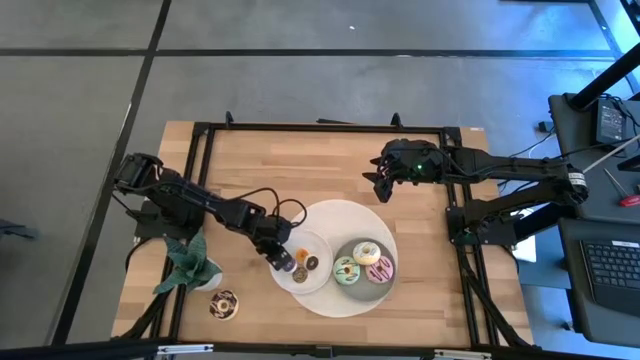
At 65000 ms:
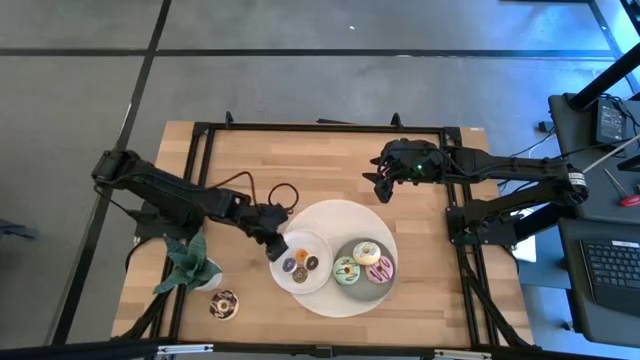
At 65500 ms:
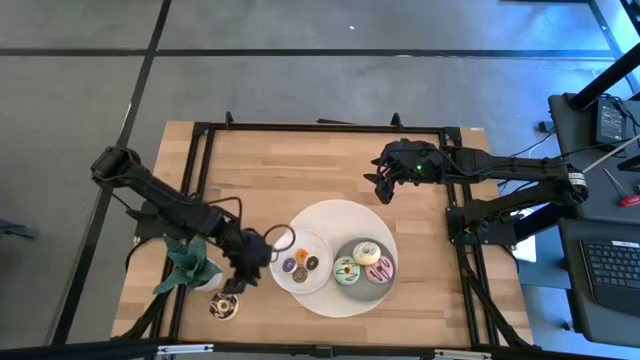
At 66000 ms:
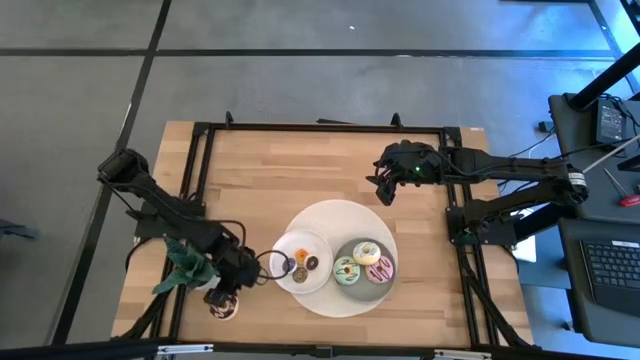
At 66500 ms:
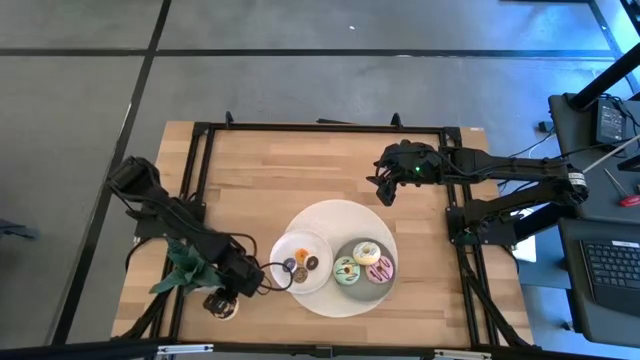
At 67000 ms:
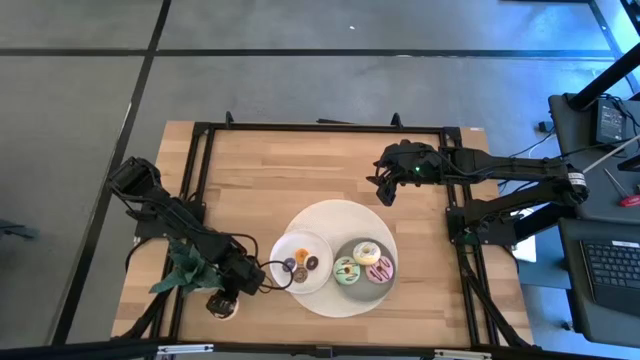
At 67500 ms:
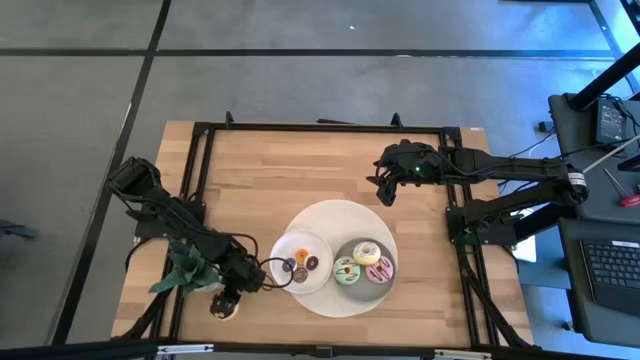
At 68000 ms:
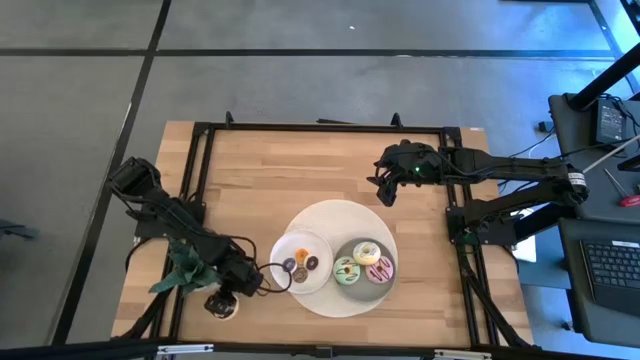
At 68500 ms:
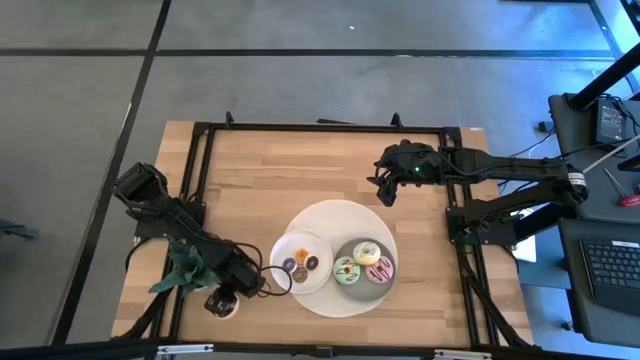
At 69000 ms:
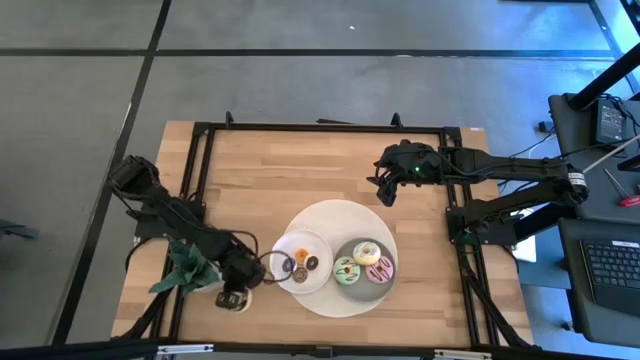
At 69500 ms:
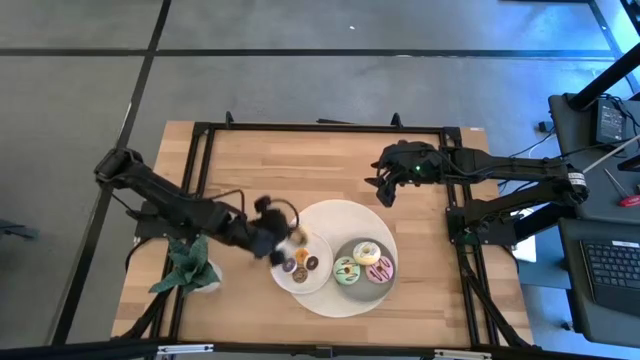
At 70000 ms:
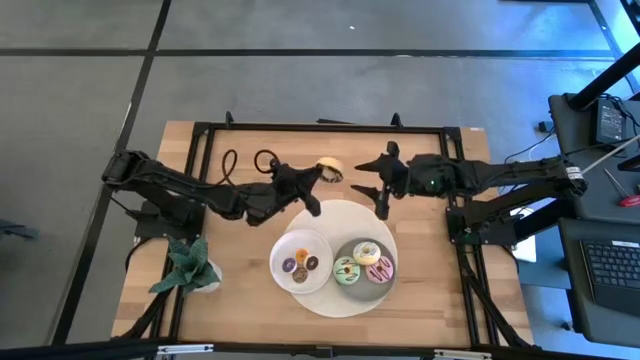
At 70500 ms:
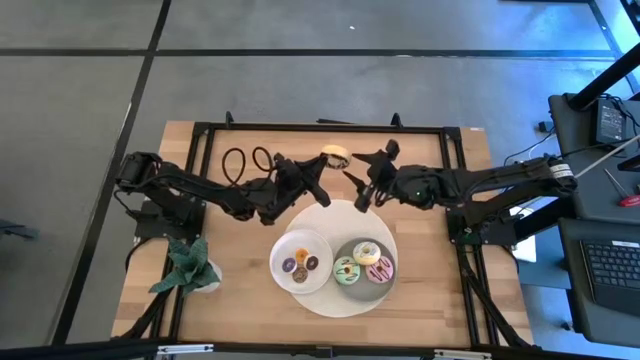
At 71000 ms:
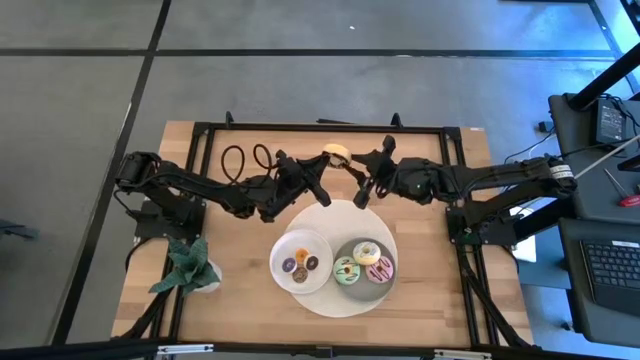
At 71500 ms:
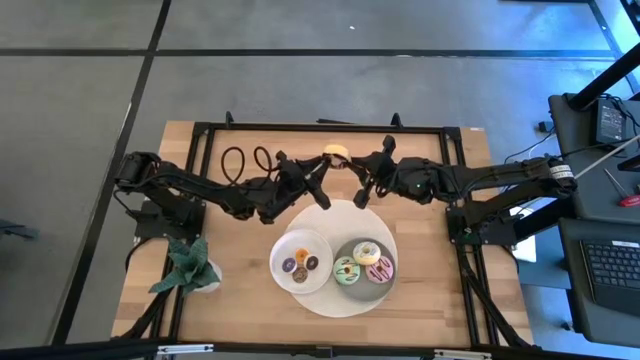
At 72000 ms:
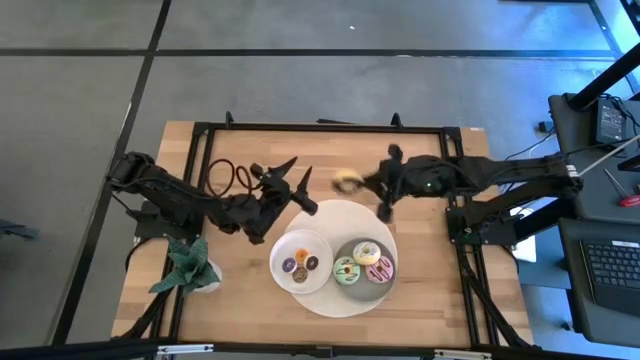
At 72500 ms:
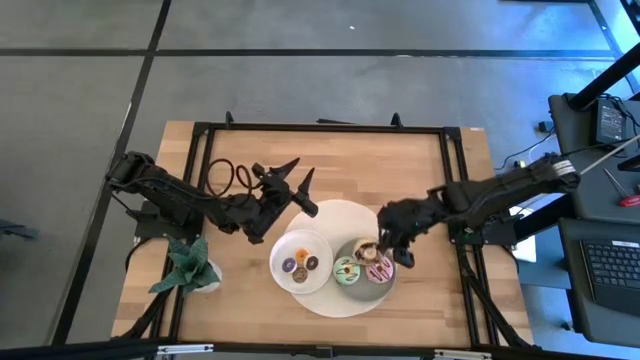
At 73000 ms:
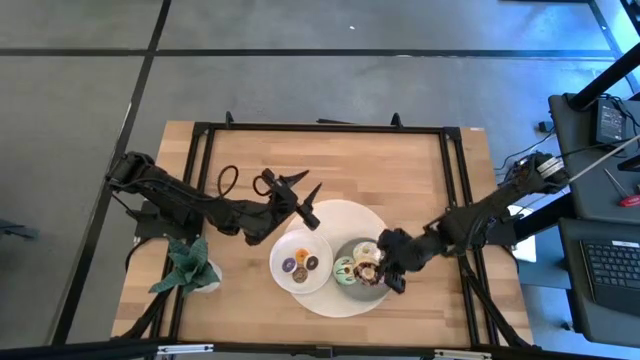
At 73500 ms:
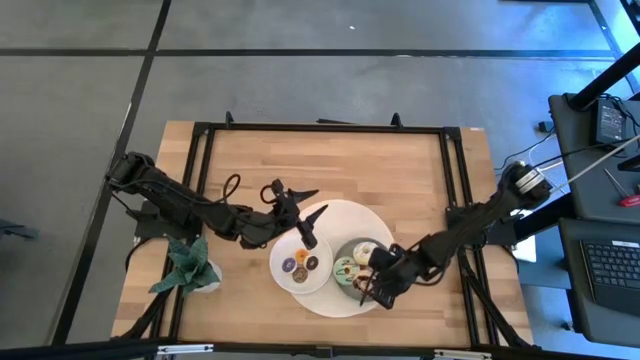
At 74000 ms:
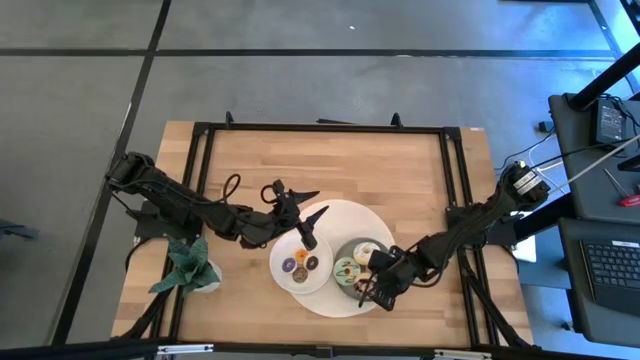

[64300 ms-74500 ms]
Task: Pick & Place donuts
Put the large black donut on the gray plate

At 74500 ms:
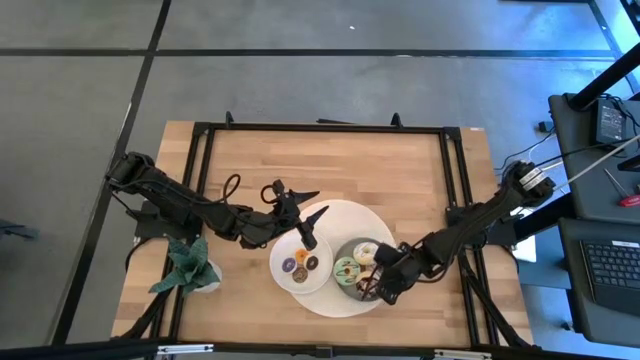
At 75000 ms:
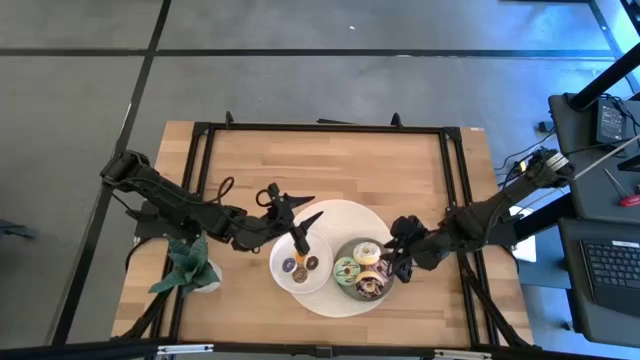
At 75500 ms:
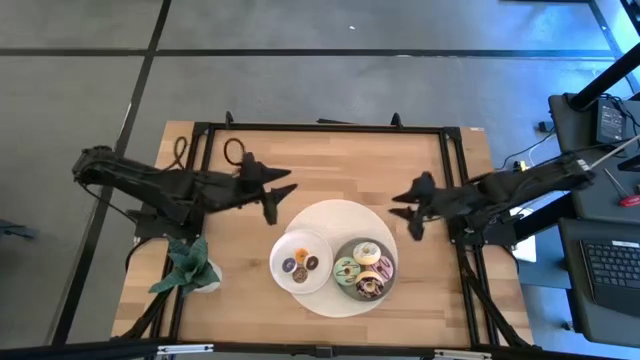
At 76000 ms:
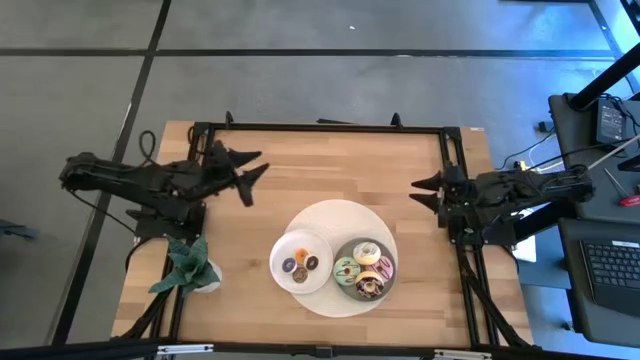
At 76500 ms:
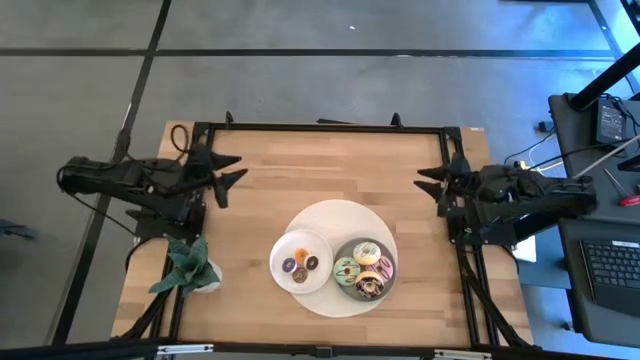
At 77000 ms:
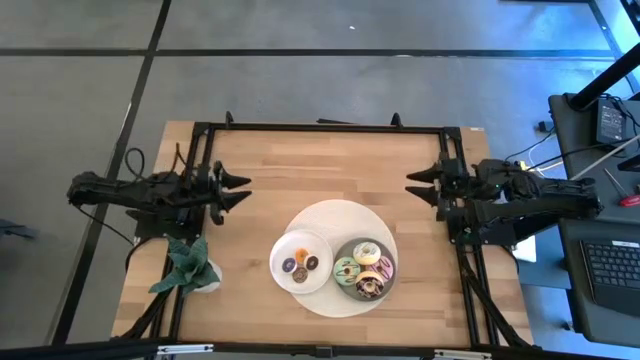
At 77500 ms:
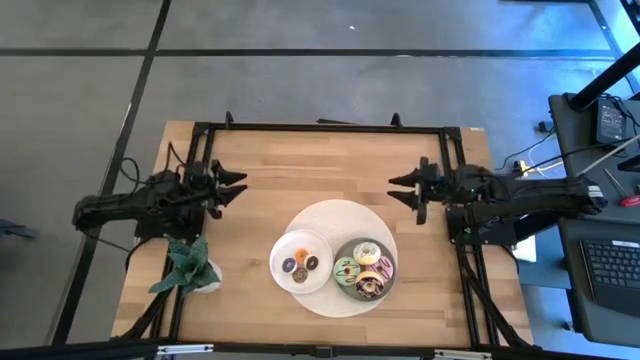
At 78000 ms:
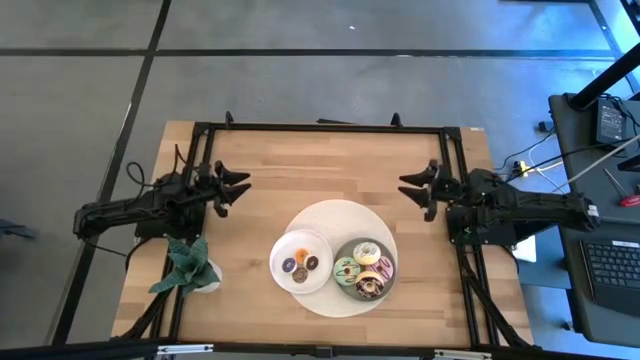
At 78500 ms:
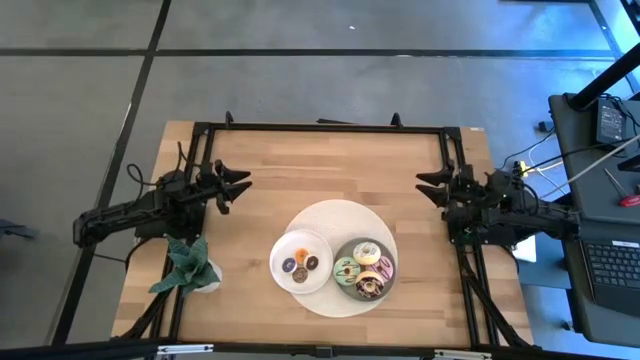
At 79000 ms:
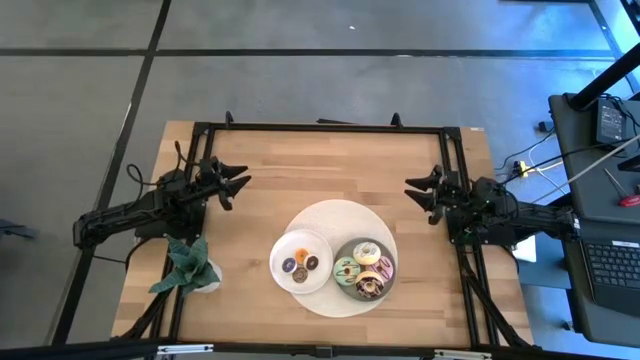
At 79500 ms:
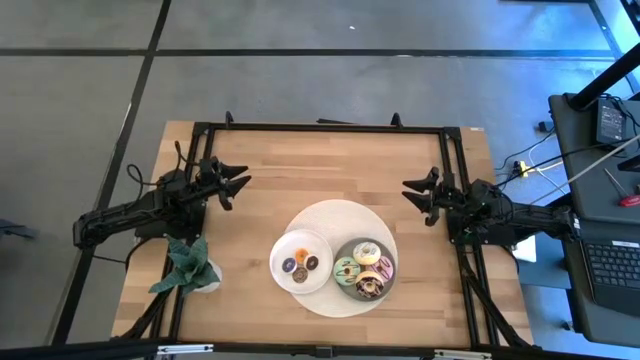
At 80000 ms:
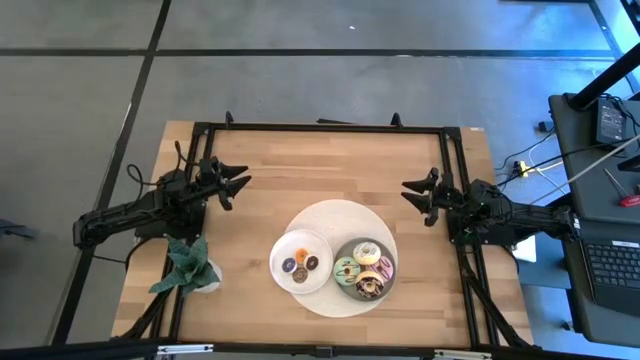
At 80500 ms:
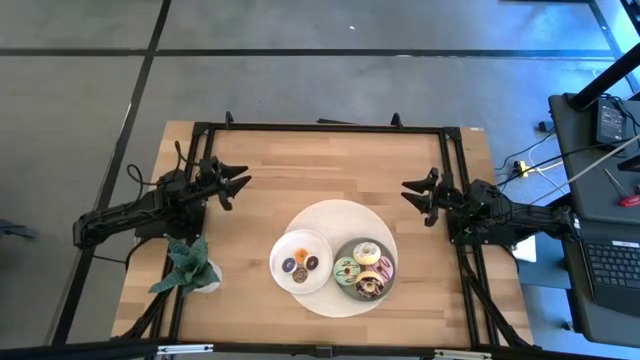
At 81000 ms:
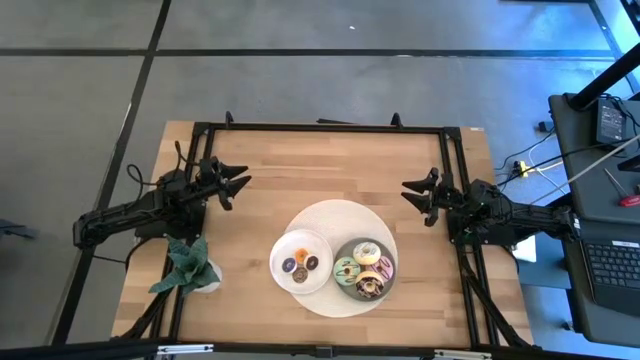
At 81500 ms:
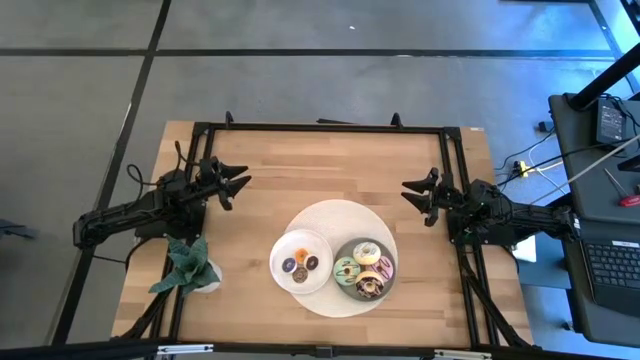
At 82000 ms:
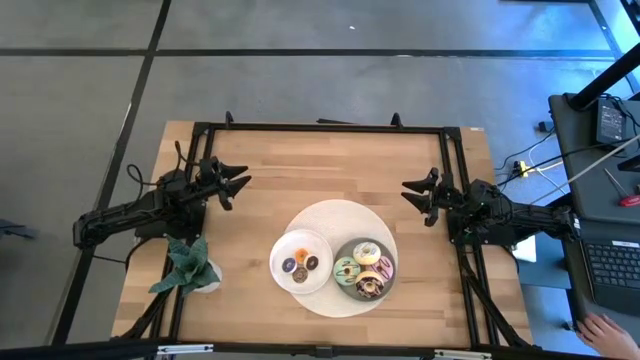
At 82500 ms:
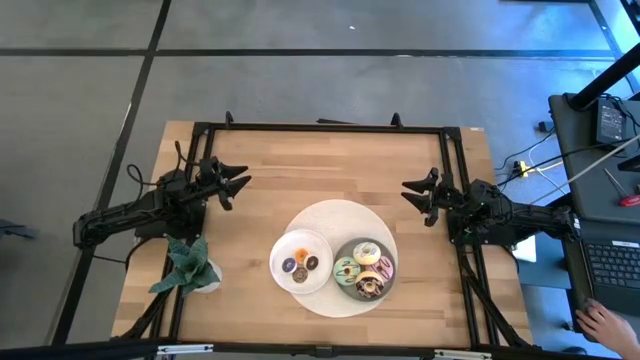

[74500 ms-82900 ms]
Return to Home Position

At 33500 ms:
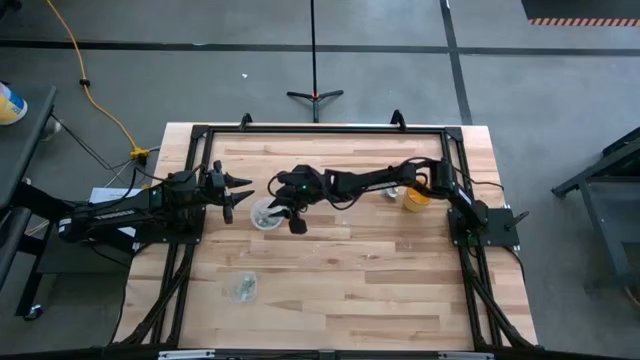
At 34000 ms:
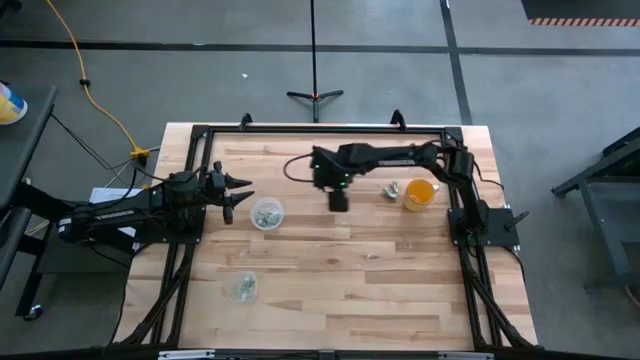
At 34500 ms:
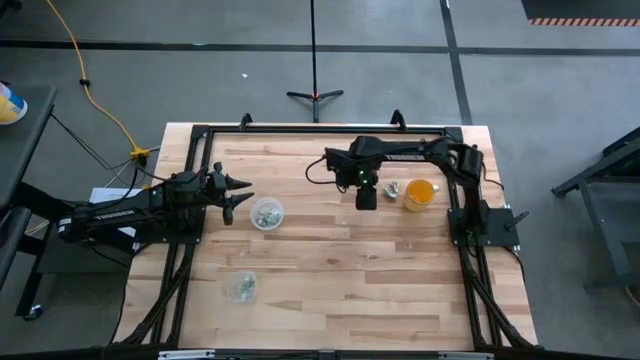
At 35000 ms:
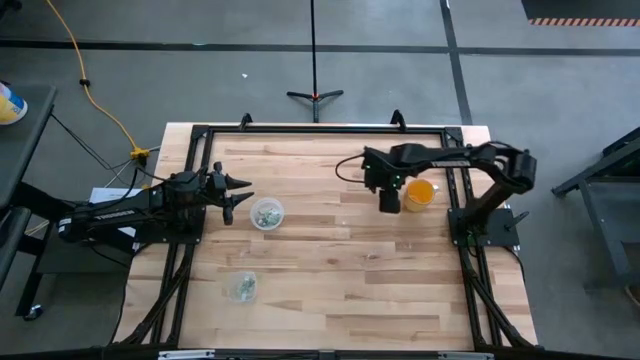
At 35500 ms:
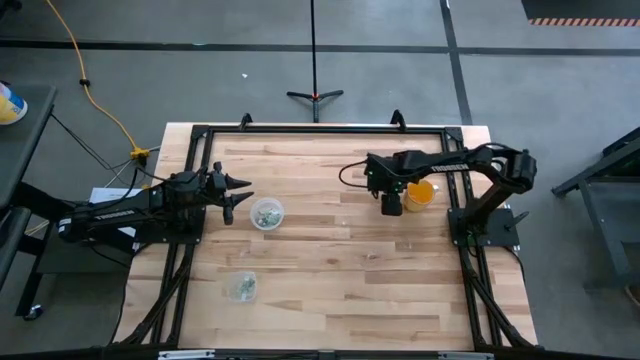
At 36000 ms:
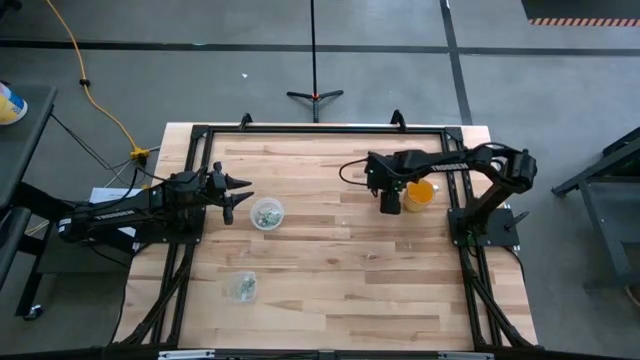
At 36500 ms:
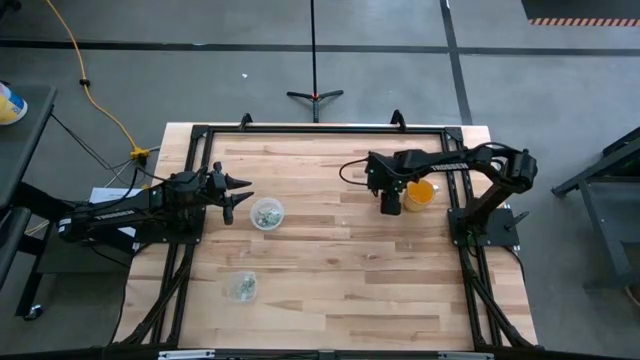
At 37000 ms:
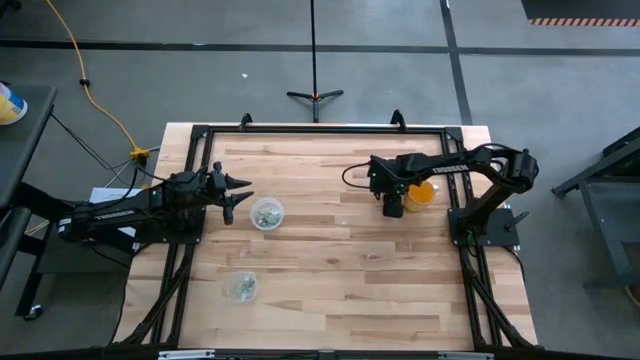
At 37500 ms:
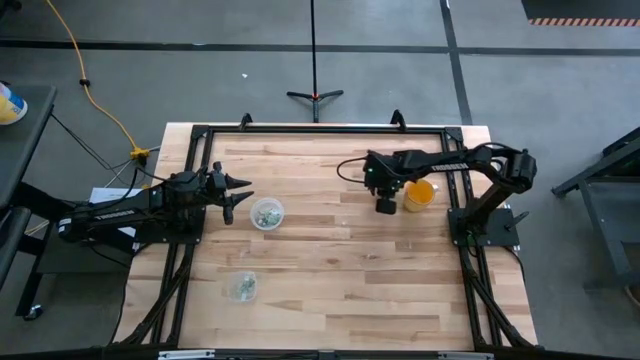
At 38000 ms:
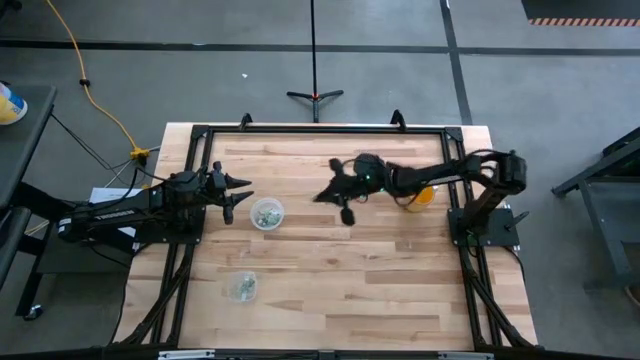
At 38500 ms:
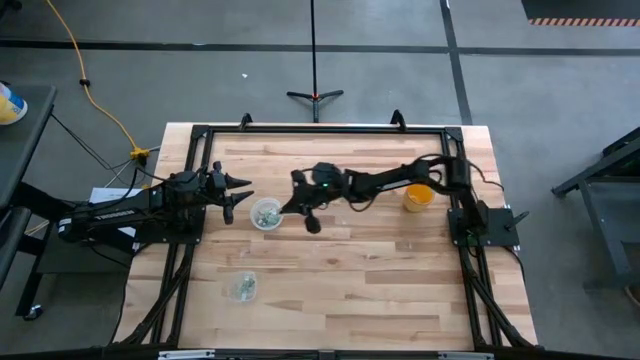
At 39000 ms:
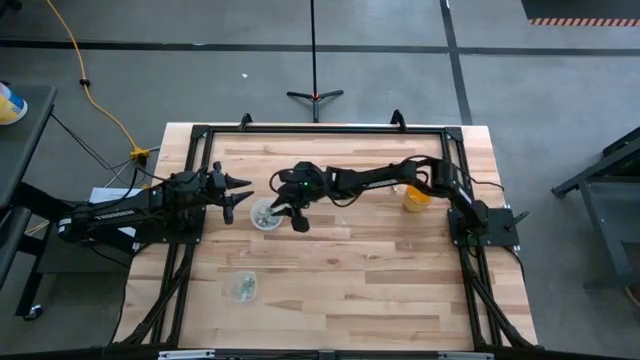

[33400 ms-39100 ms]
Task: Pick and place Stevia / Truvia into bins
Put the stevia packet in the top transparent container
